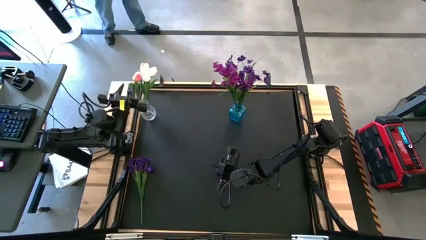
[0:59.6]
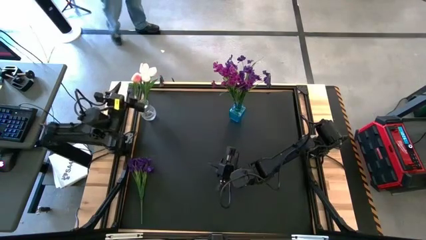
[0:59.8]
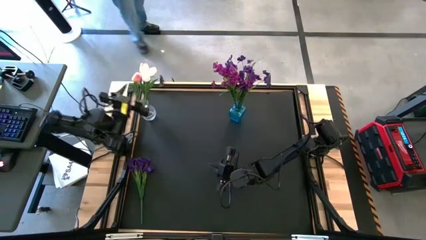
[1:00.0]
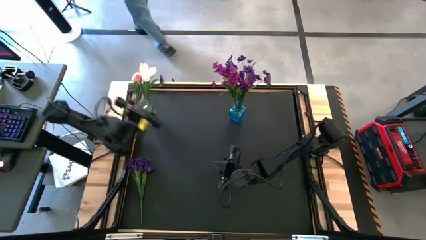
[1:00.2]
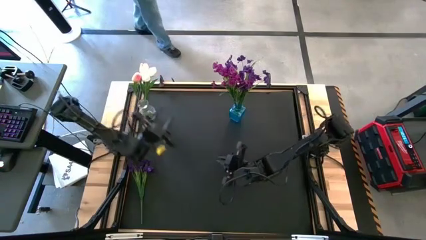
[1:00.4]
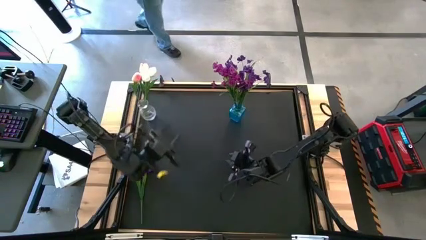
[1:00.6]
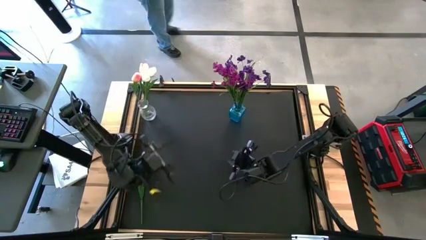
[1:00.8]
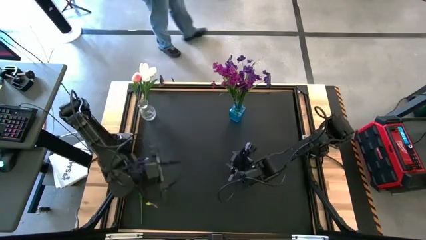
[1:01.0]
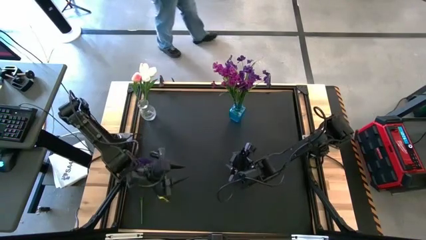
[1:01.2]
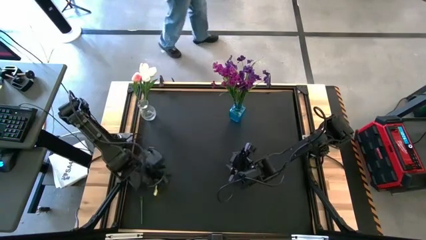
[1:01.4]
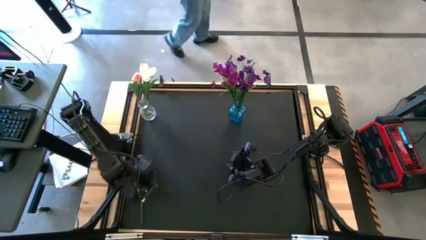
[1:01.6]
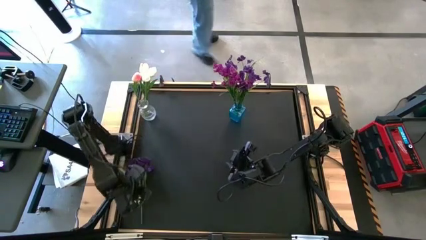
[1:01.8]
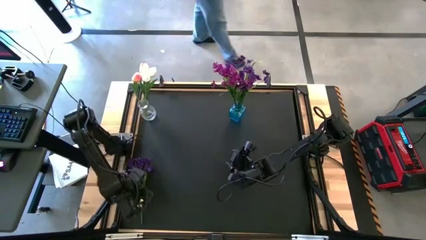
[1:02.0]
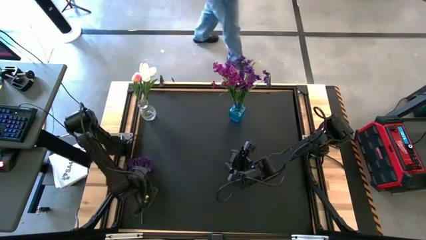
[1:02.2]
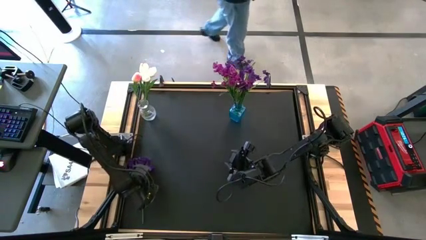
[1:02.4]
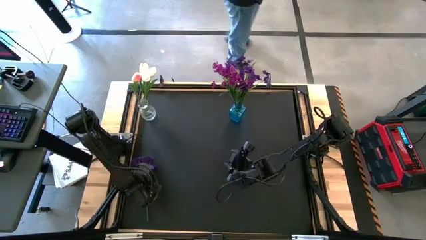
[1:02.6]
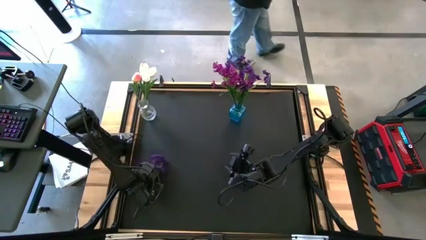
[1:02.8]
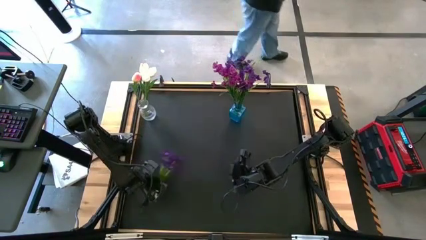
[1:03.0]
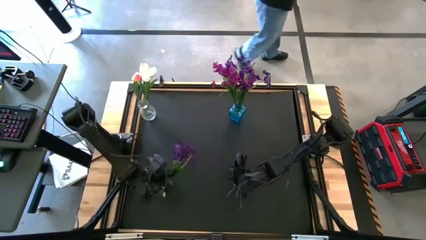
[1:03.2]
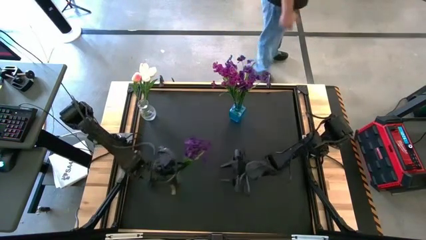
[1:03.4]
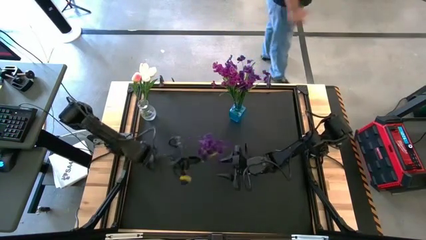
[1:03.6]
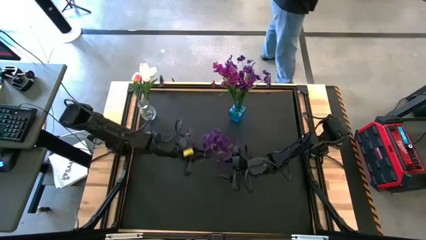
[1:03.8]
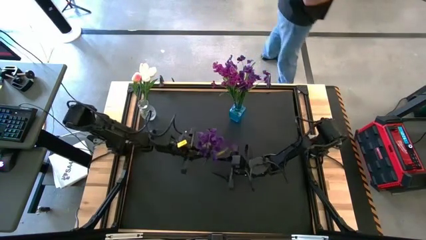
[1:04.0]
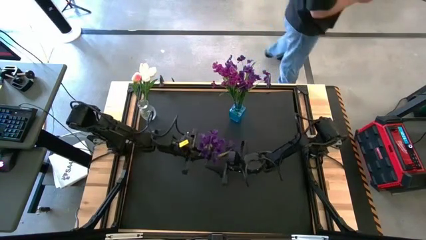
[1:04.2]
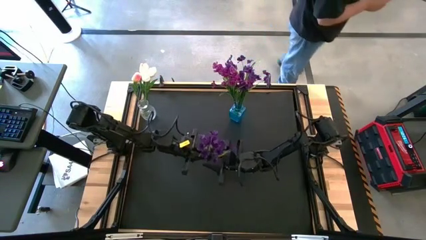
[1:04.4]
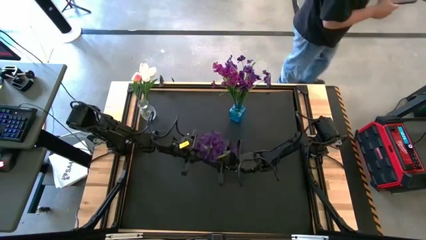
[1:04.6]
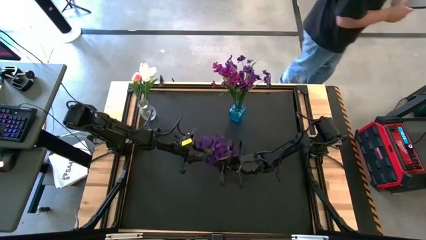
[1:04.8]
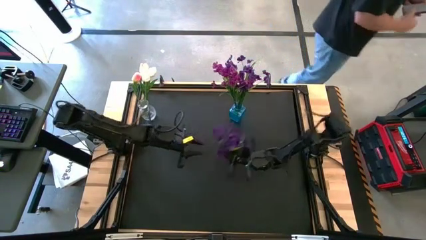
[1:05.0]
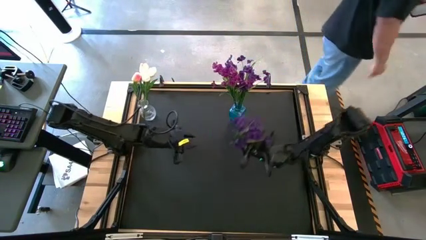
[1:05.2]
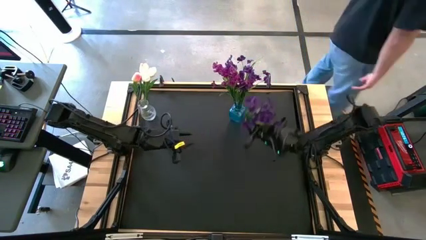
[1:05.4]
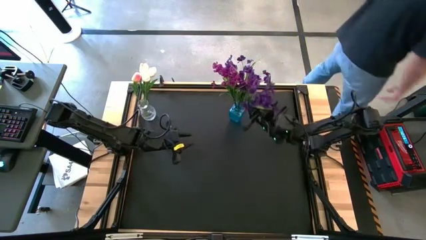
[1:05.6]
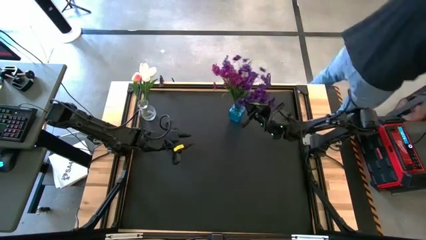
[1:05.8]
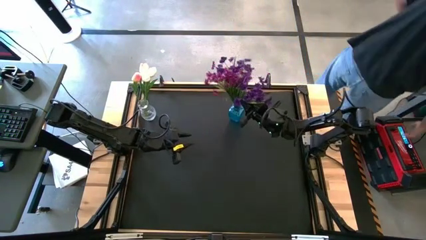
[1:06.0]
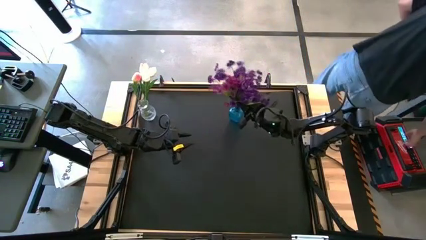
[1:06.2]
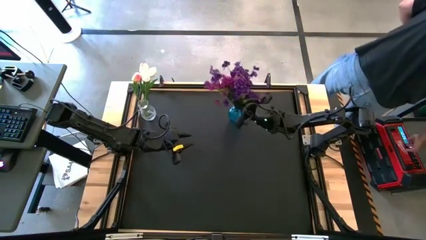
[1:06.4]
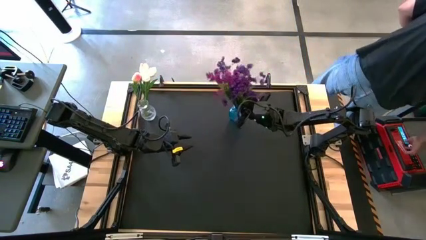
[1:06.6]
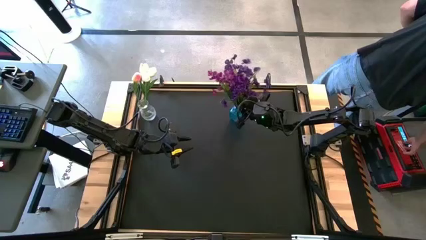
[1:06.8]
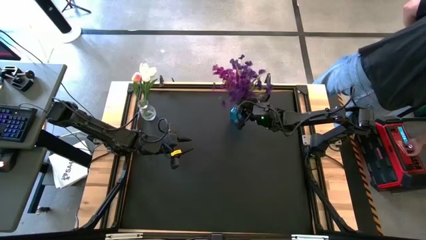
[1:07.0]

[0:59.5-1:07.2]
Task: Sort flowers into vase by color
Put the violet flowers into the blue vase

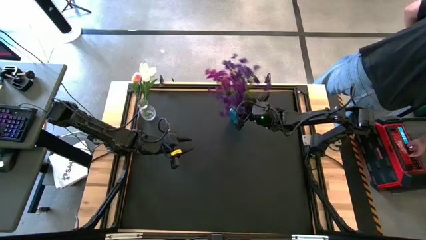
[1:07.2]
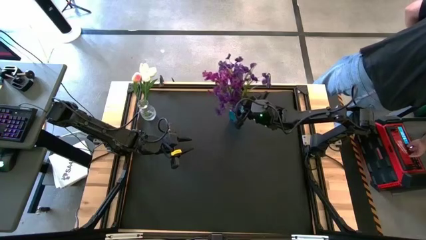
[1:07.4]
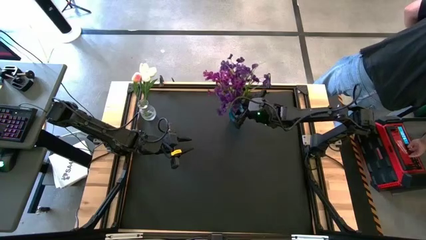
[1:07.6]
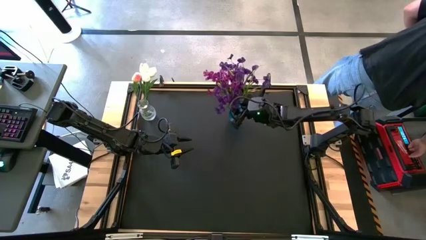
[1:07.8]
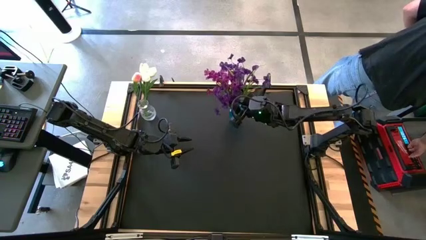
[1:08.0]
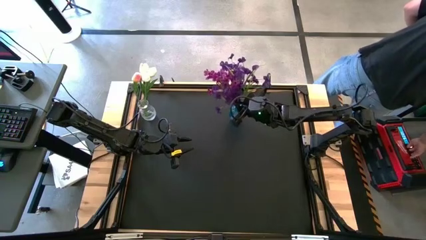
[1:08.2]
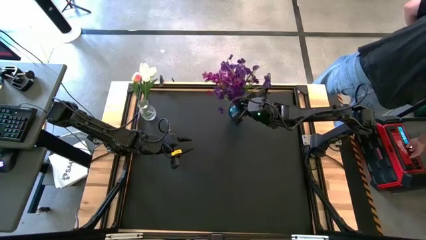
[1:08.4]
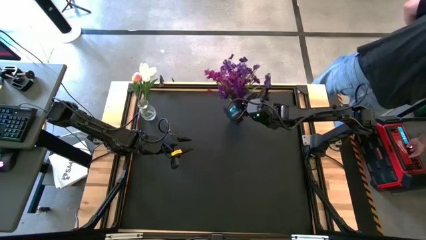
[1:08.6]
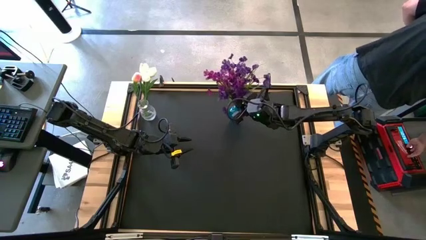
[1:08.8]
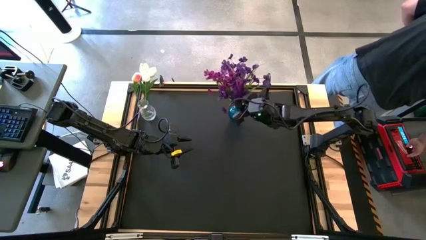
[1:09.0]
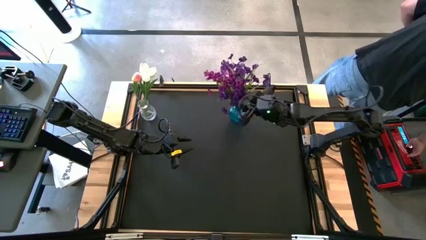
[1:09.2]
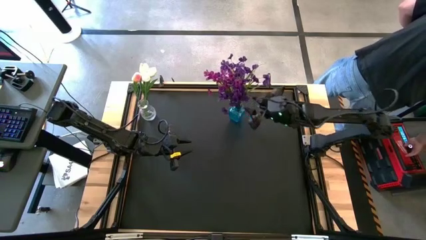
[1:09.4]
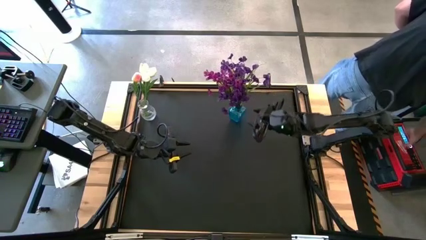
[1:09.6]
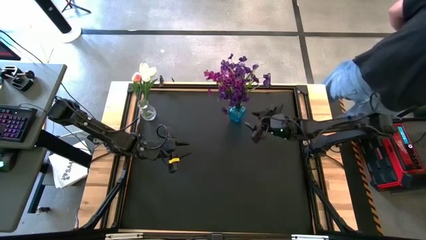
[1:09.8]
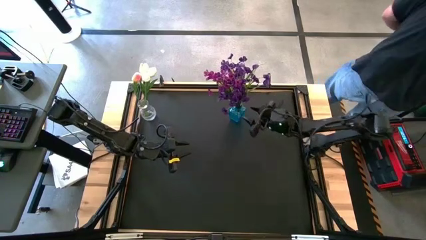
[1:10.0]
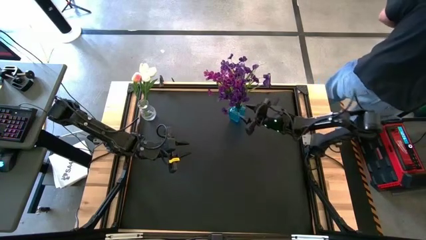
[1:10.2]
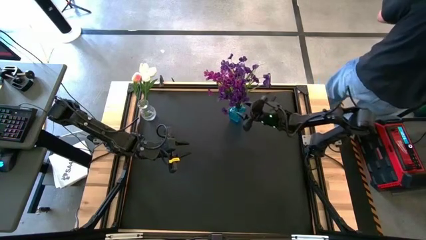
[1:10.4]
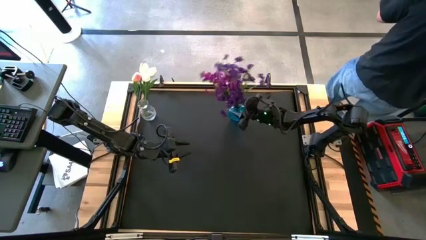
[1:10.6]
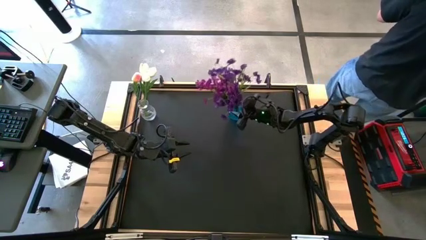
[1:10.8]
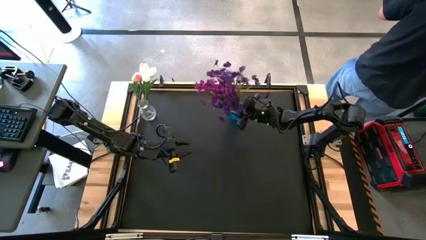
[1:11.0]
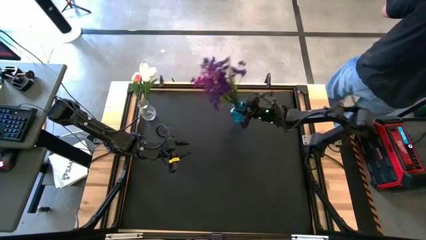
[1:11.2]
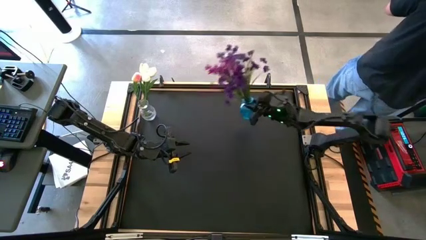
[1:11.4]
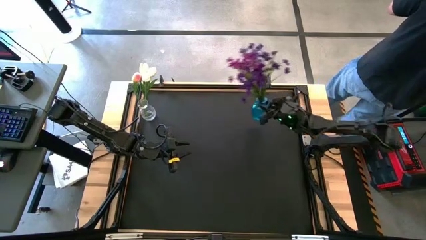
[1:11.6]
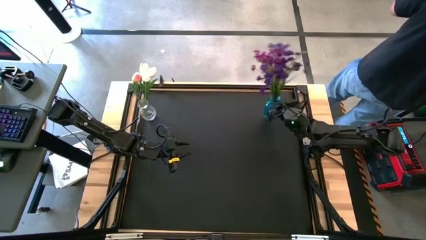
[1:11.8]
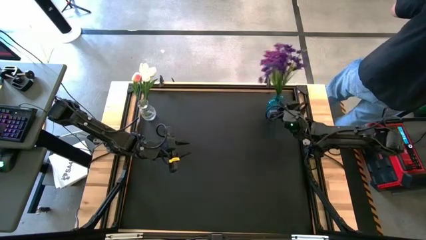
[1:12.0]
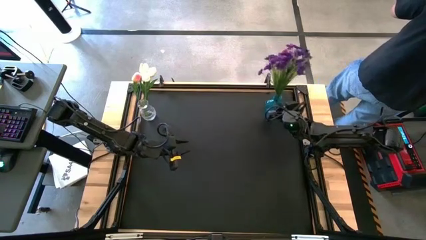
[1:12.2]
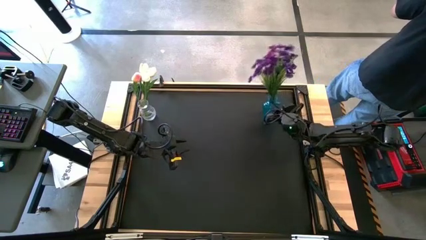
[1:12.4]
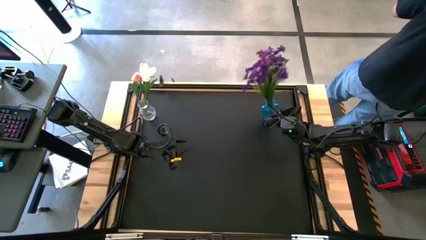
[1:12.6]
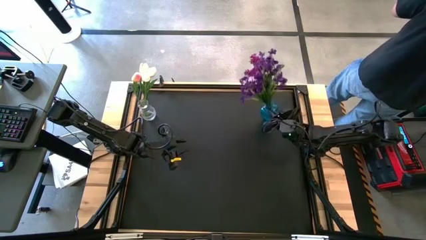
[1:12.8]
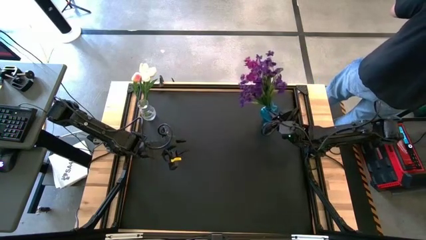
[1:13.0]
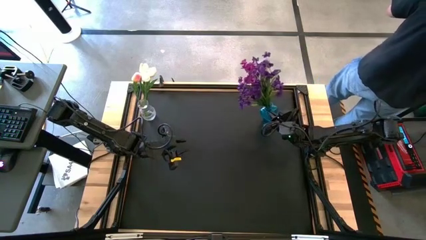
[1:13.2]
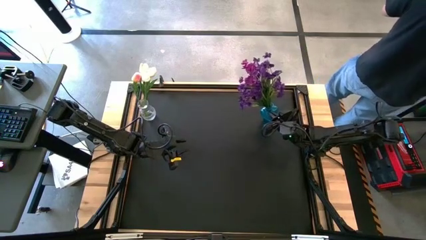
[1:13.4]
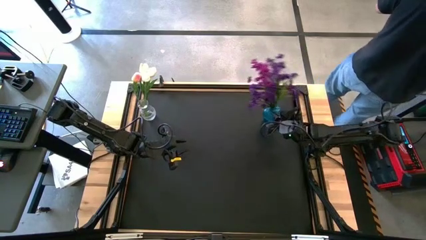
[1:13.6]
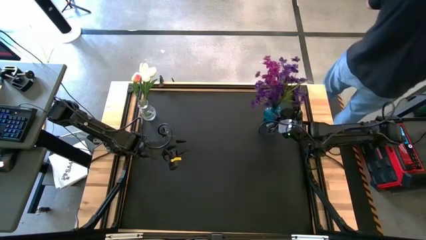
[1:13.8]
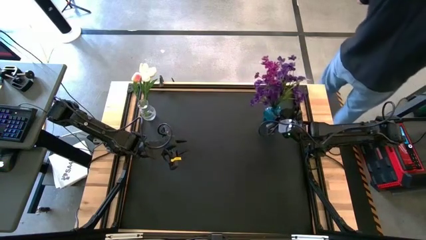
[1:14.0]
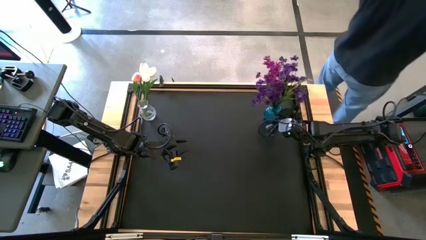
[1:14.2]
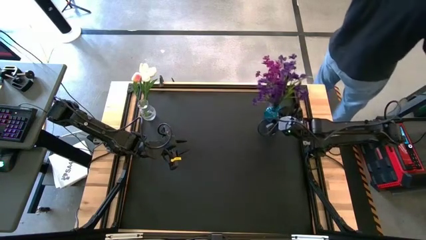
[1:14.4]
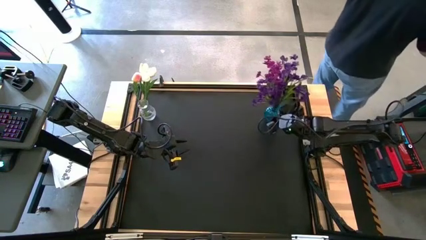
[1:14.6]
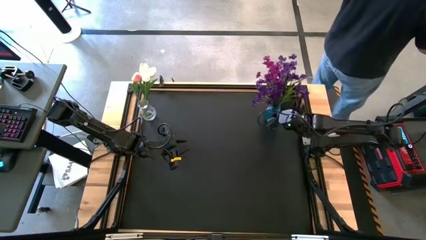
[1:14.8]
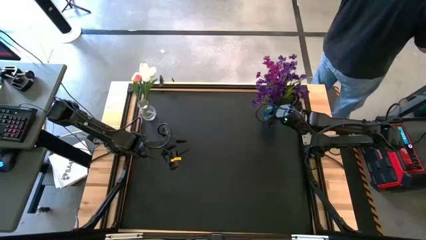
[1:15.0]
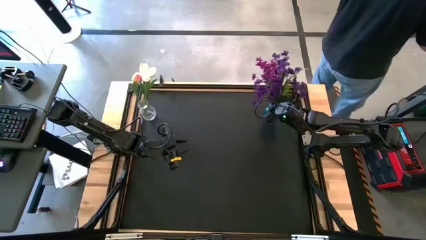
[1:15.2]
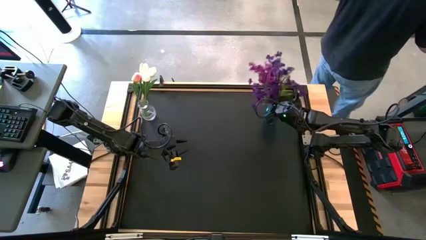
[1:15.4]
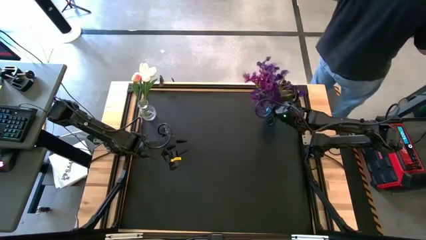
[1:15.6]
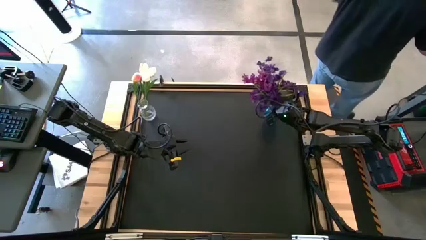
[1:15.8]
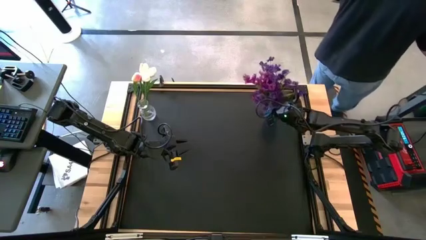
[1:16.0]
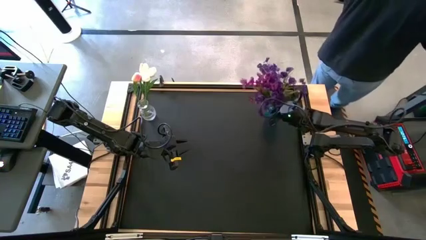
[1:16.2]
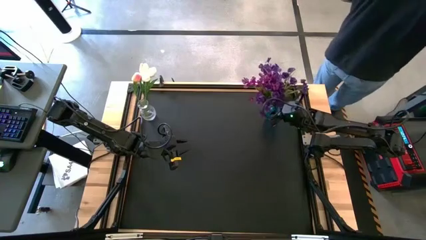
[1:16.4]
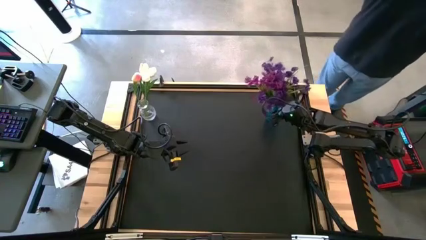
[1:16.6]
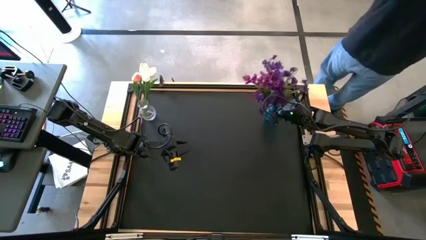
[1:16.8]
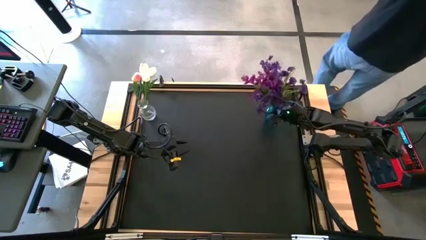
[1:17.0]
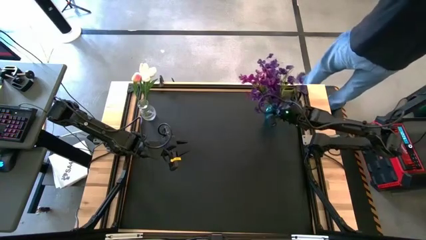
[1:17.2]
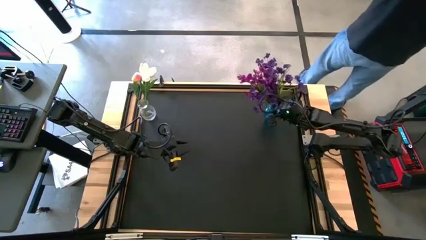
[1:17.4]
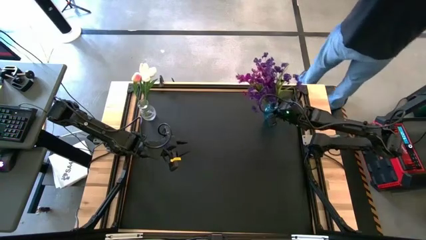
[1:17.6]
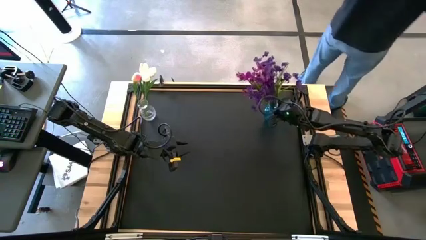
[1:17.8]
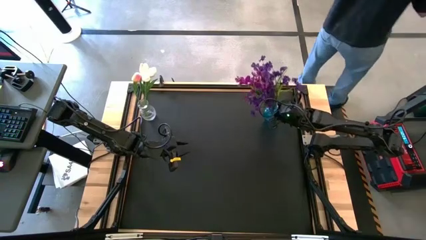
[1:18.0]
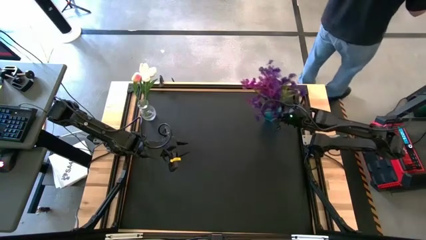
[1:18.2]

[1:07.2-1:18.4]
Move the blue vase to the top right of the table
